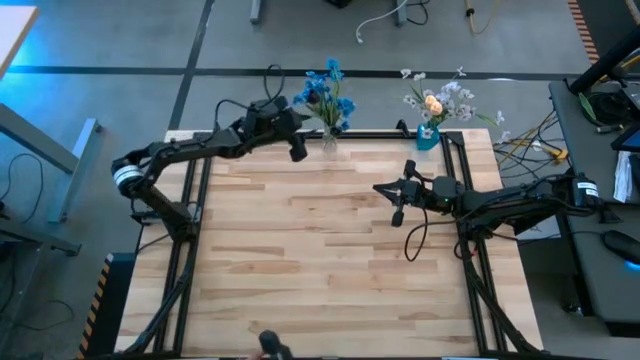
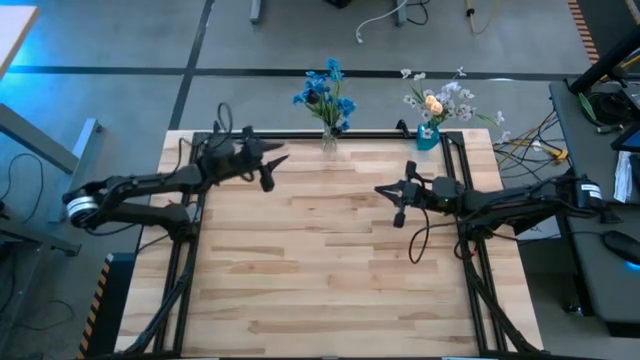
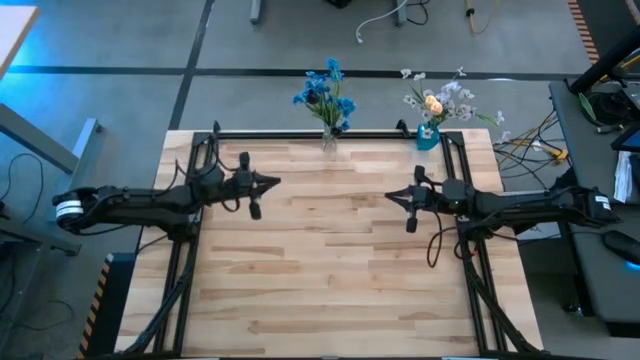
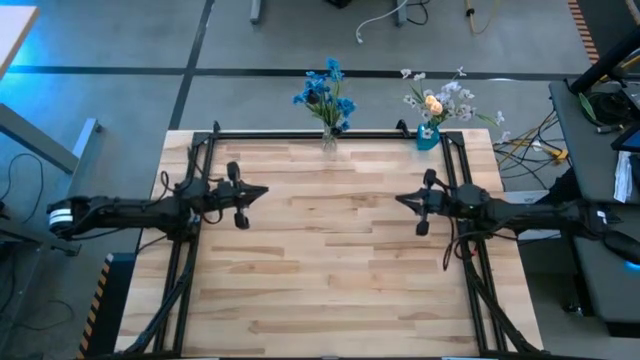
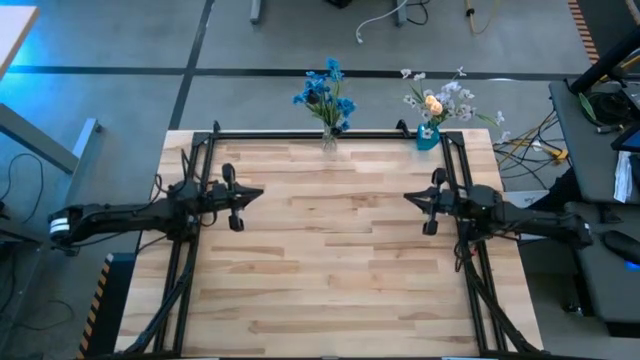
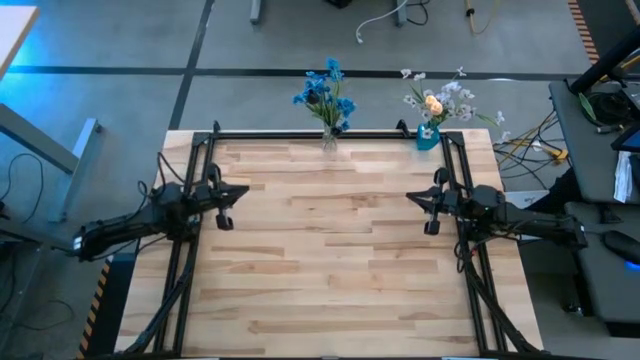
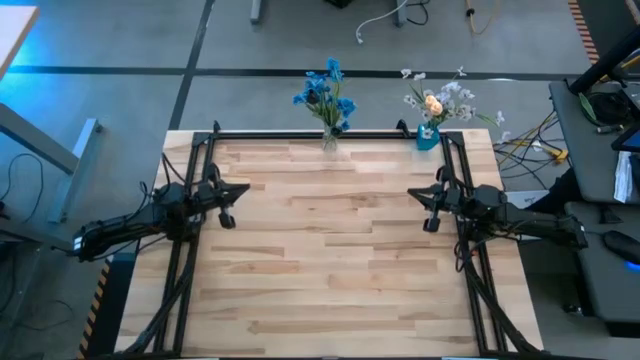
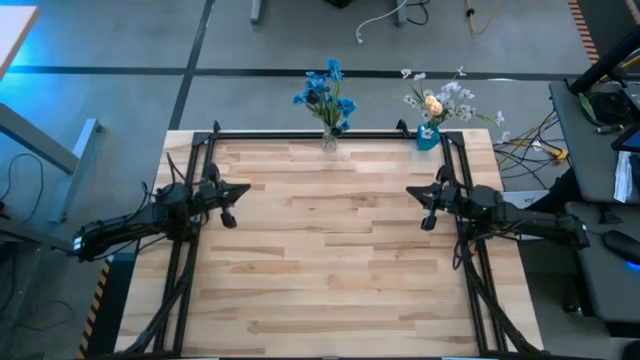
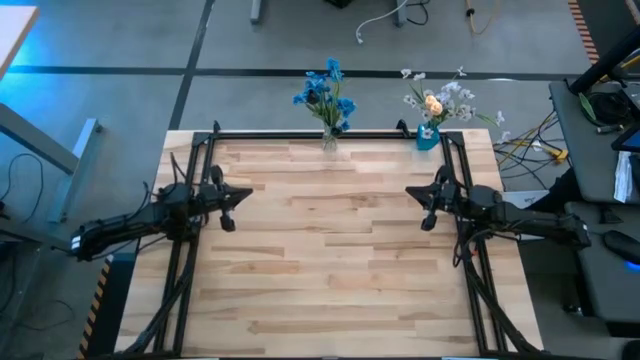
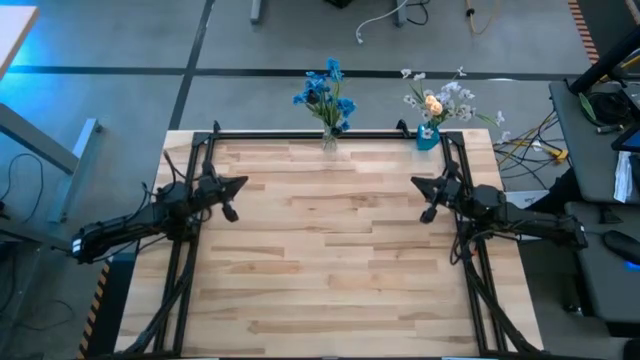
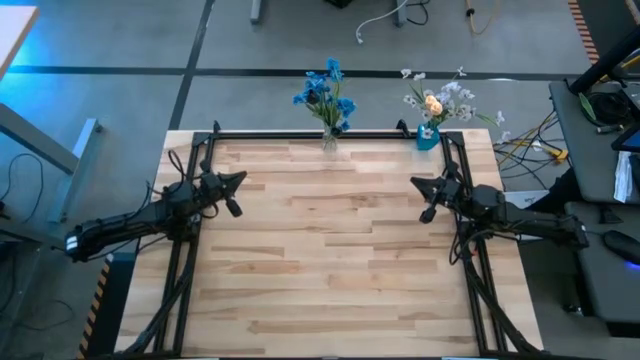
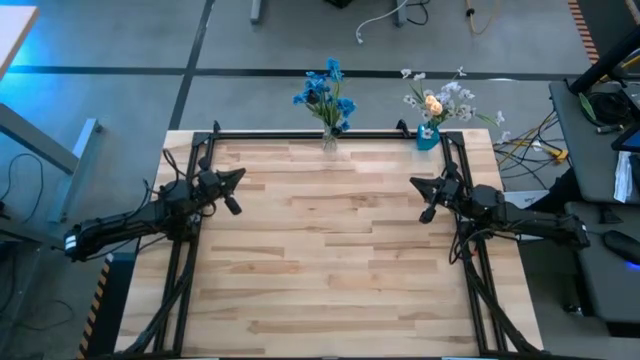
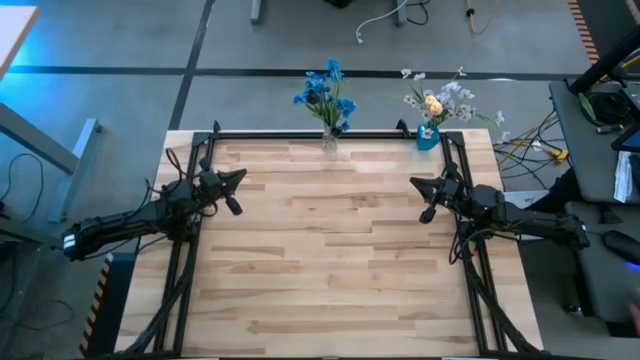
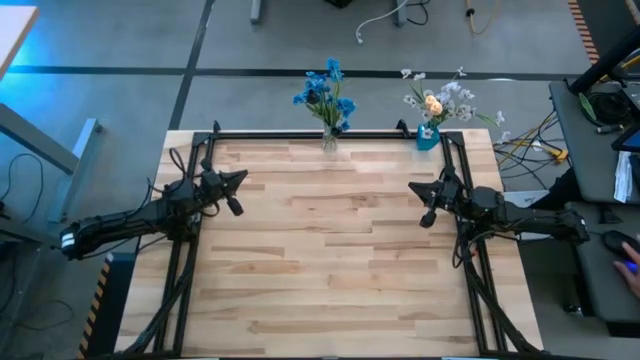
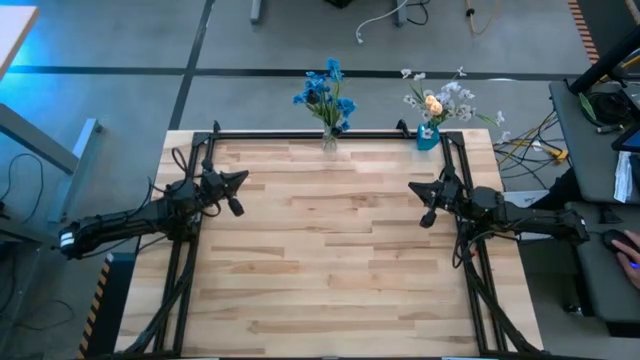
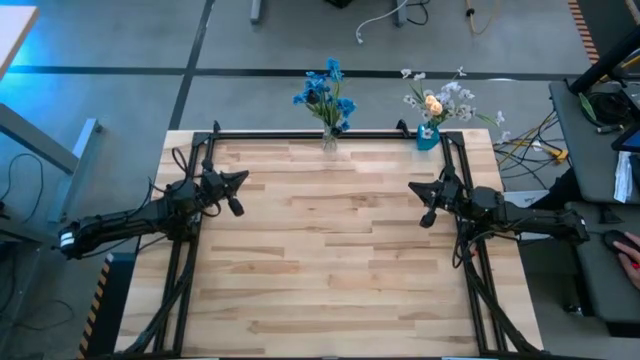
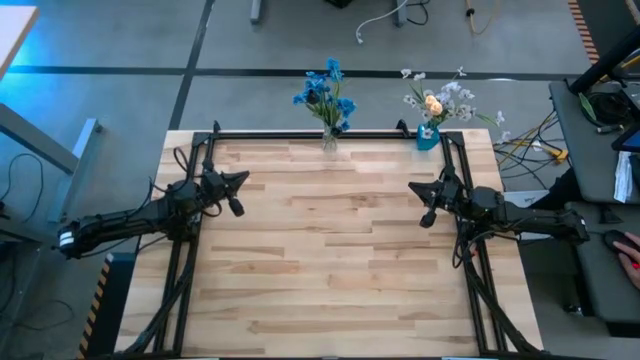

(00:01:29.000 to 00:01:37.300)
Task: Sort flowers into vase by color
Return to Home Position

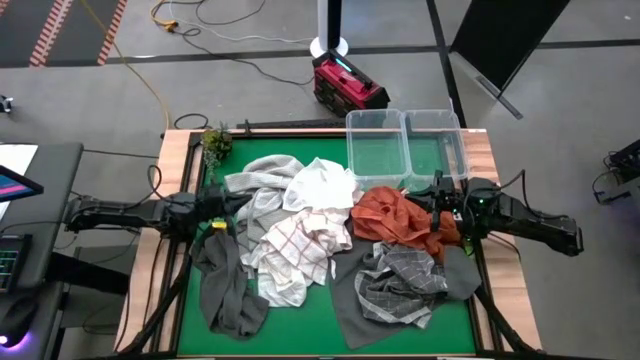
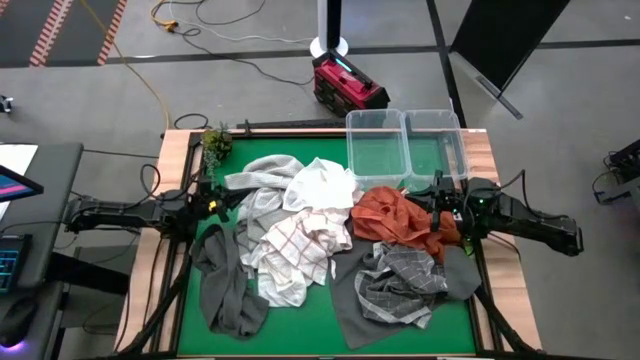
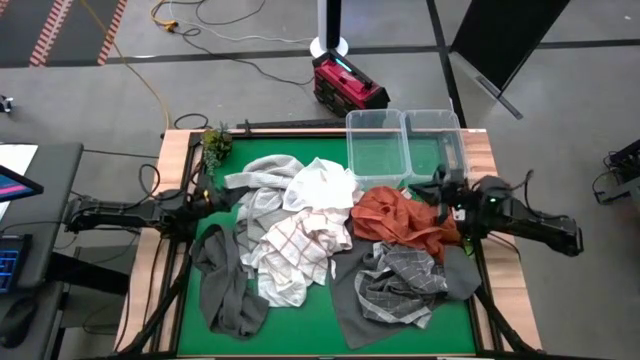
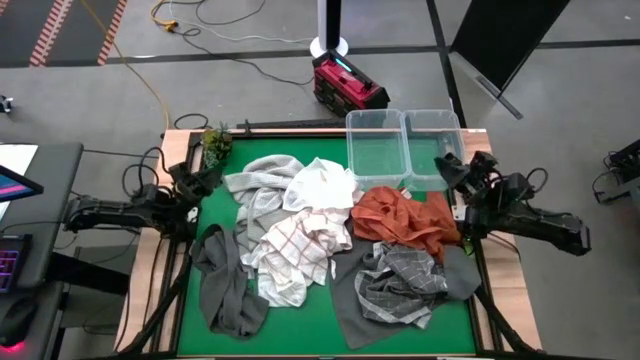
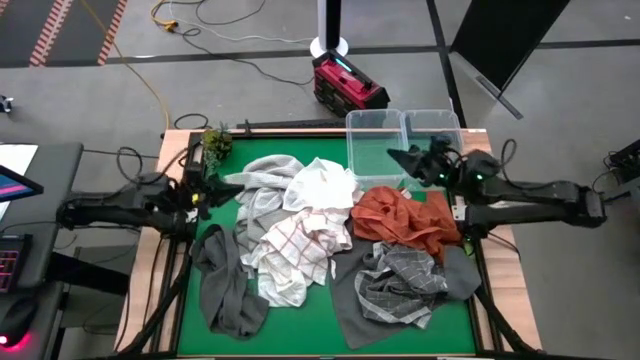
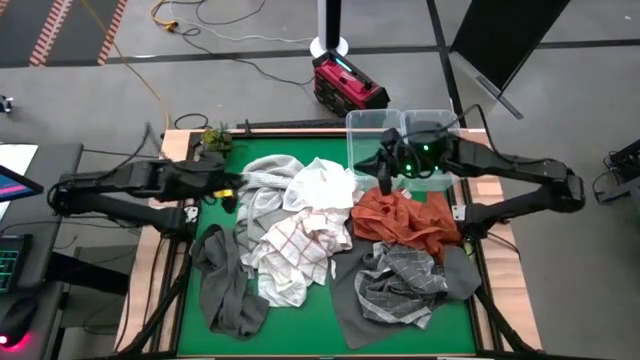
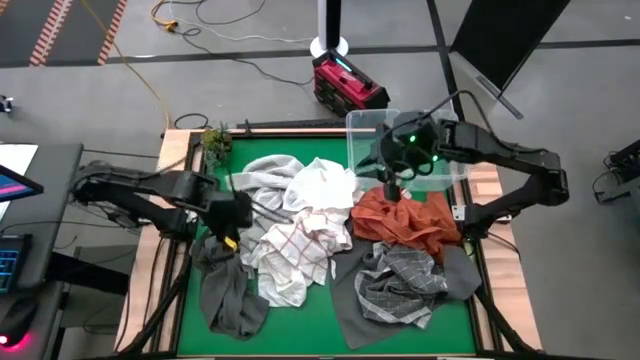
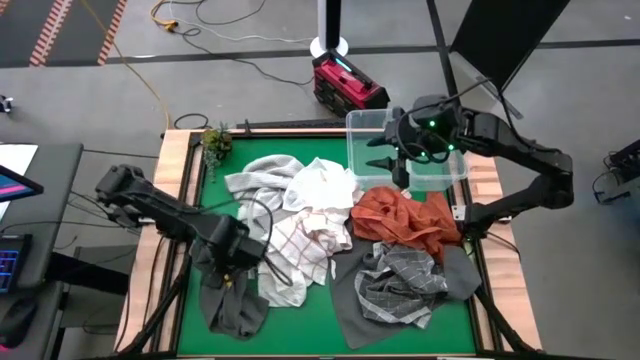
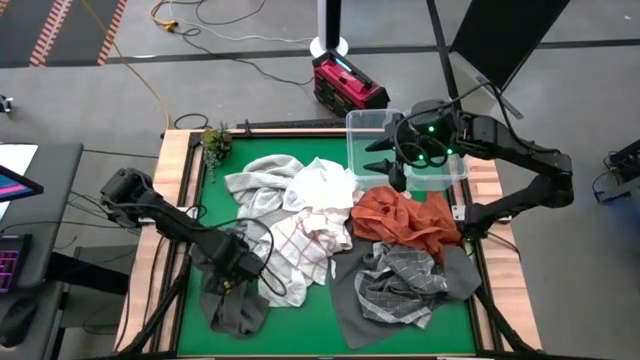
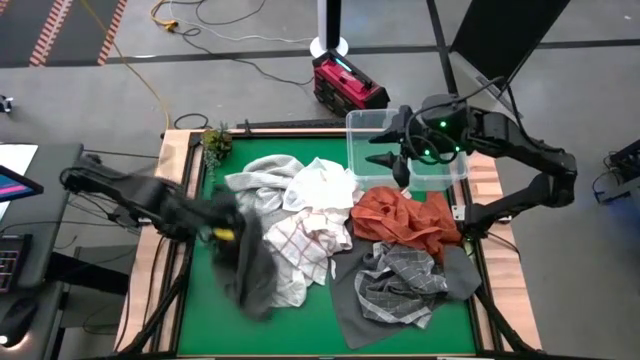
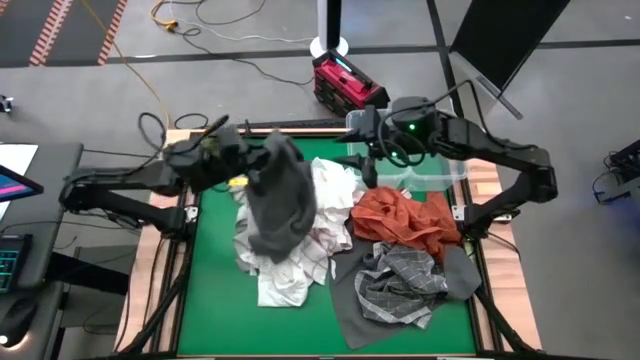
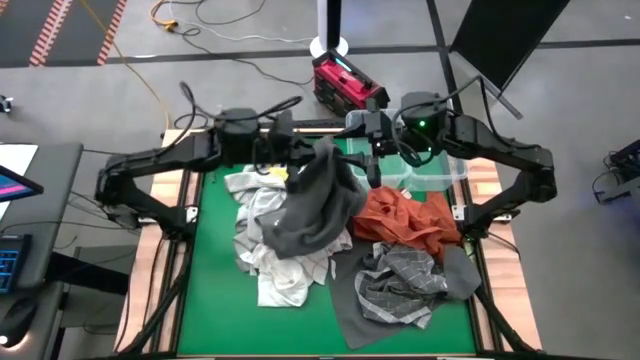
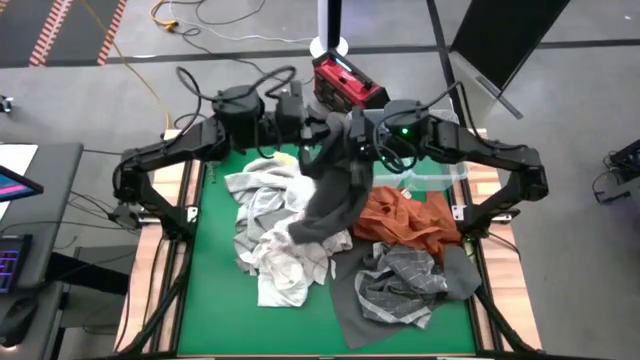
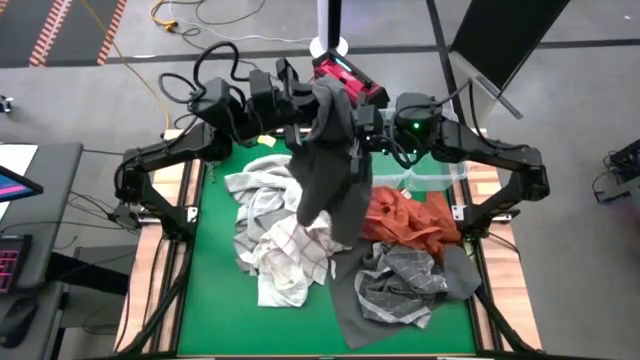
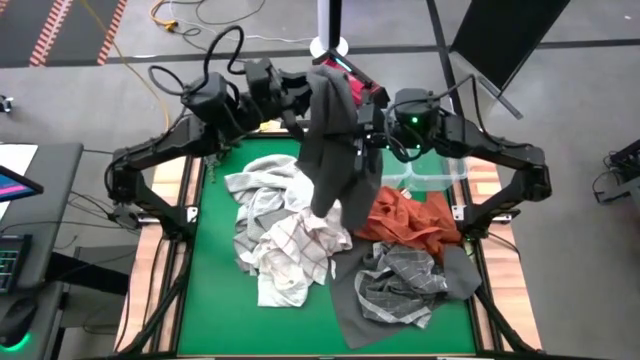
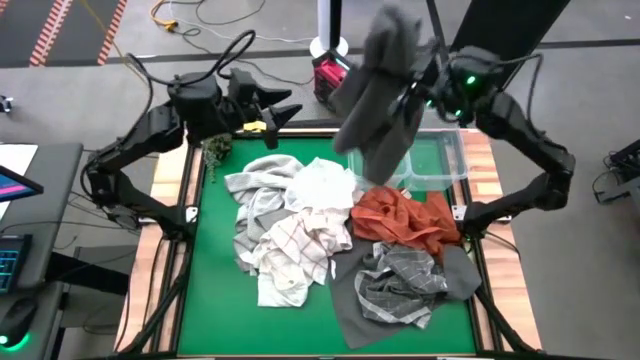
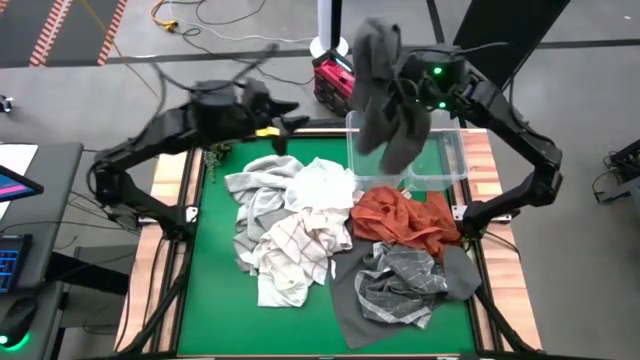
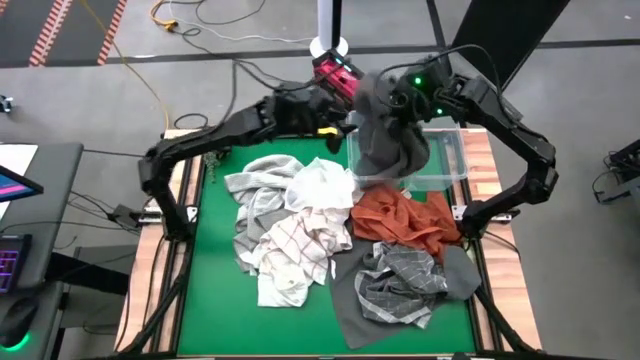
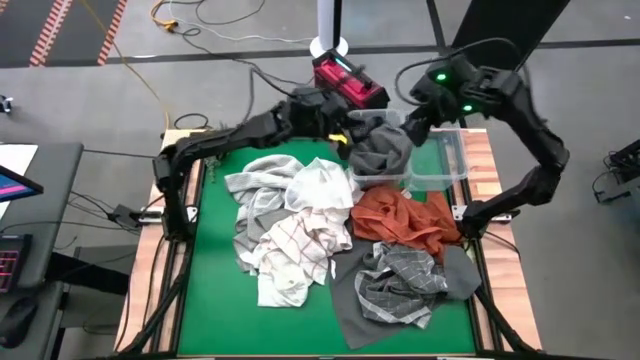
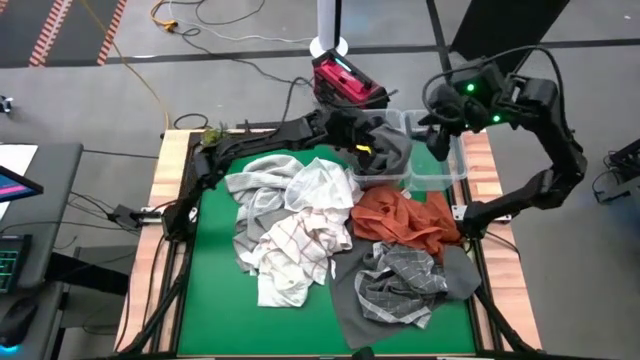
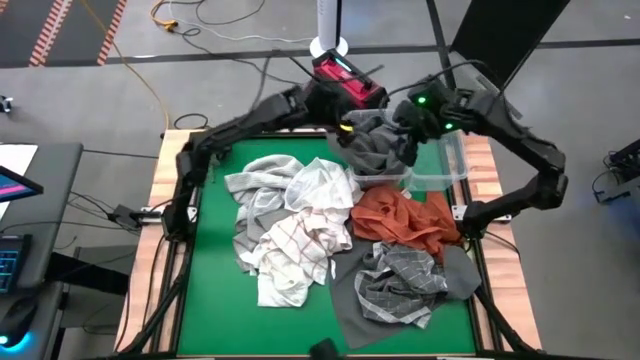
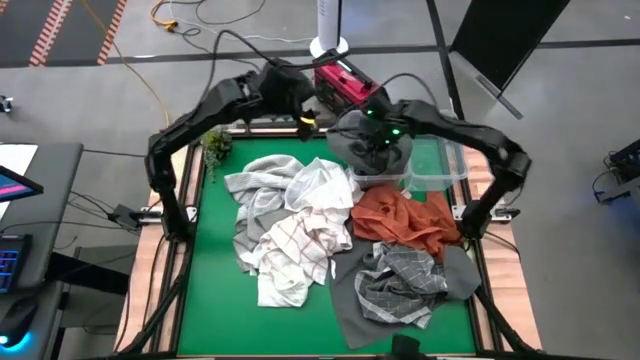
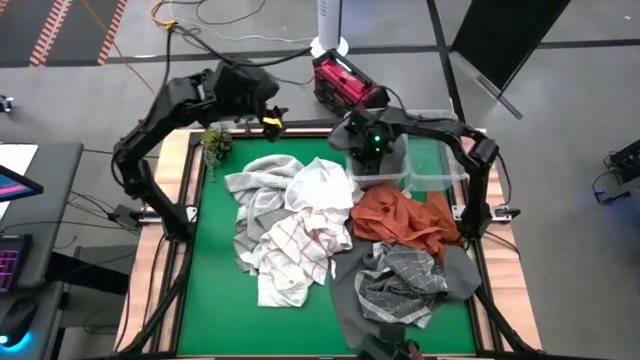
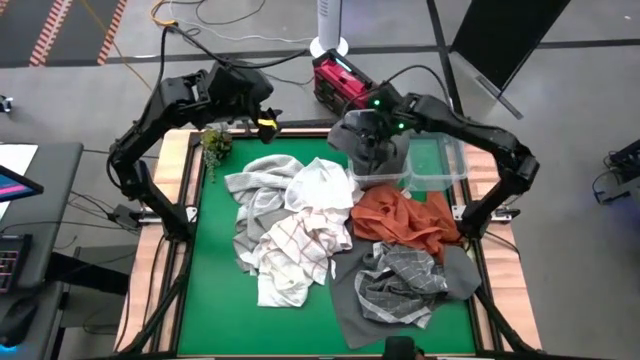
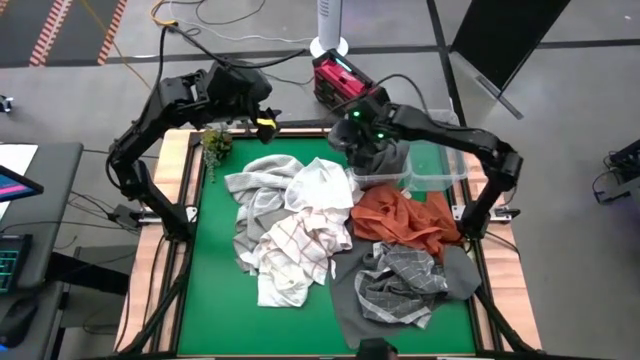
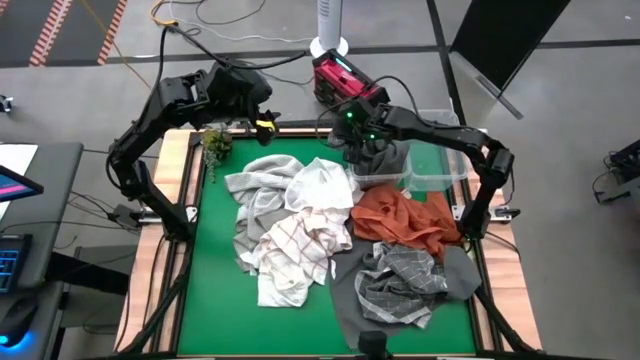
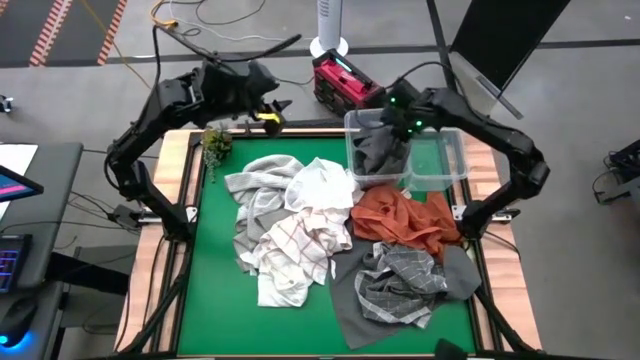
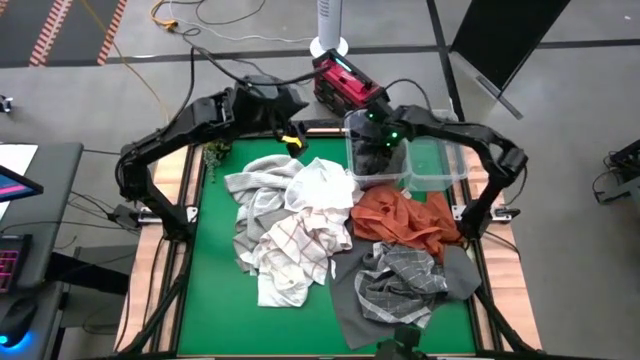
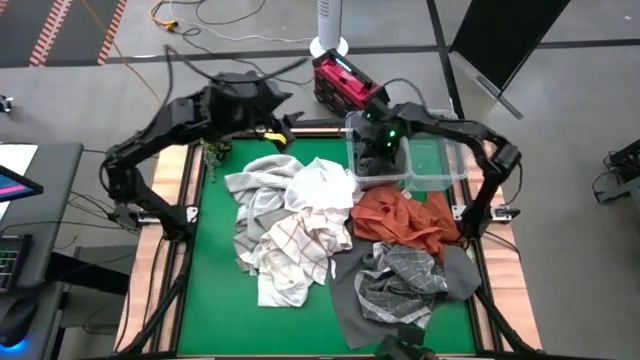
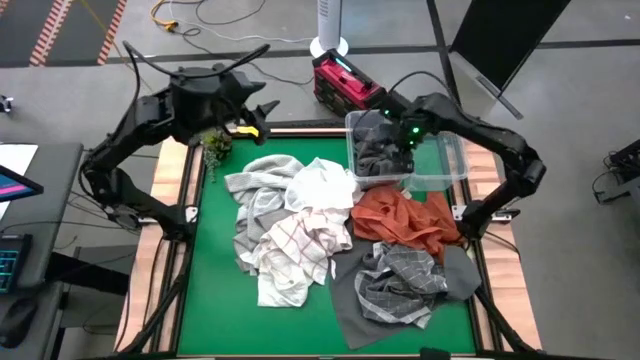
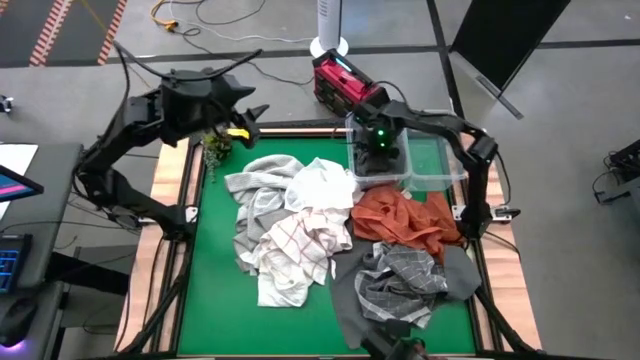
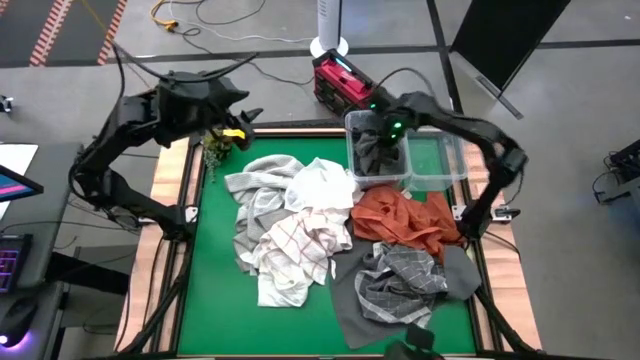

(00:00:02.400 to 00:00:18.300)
Task: Sort towels by color in basket
Put the left dark gray towel into the left transparent bin
